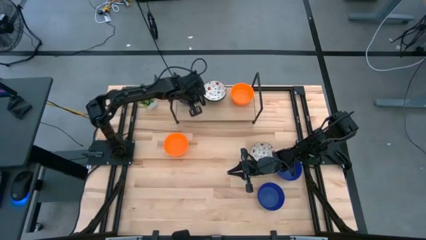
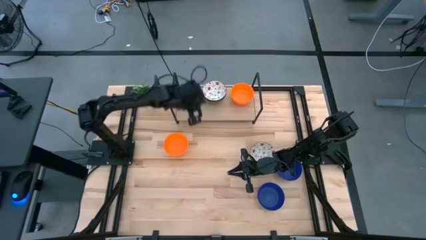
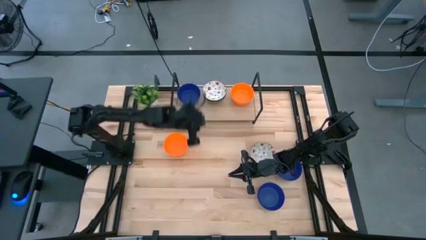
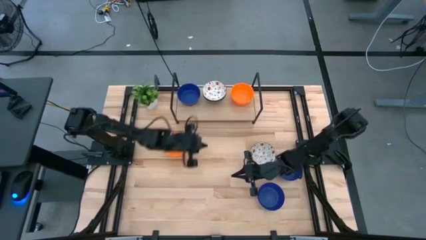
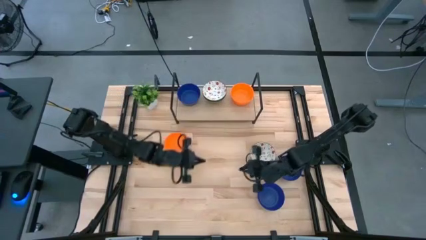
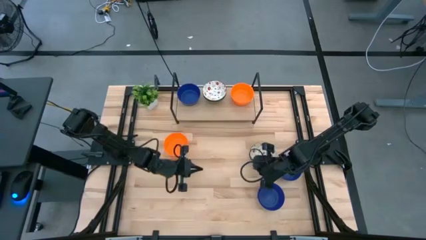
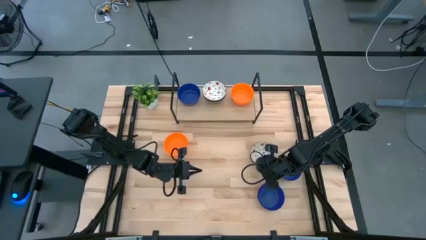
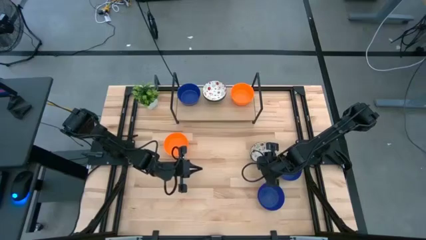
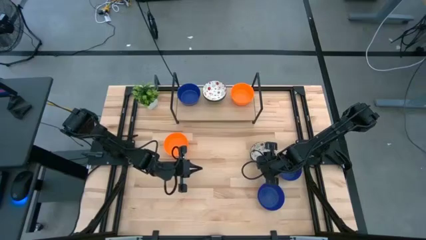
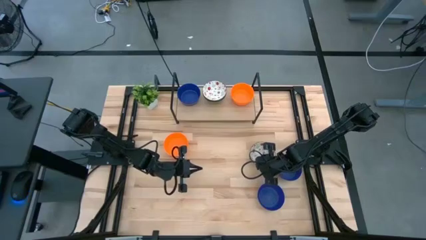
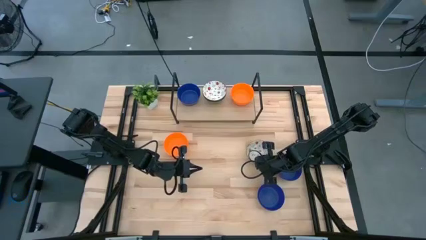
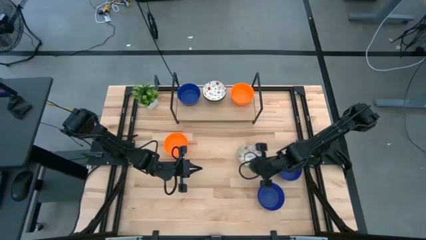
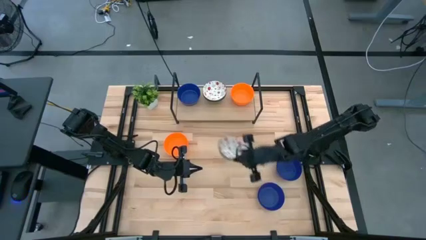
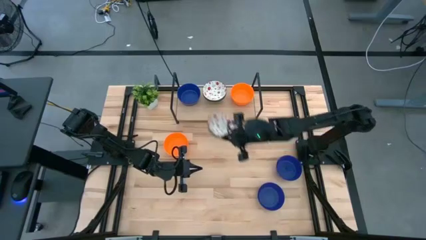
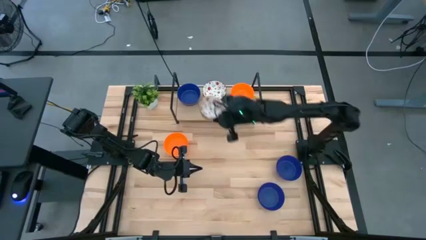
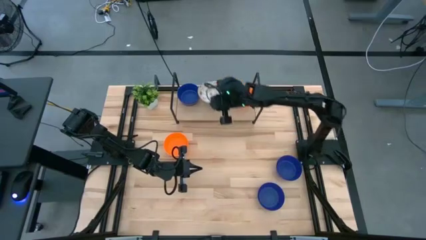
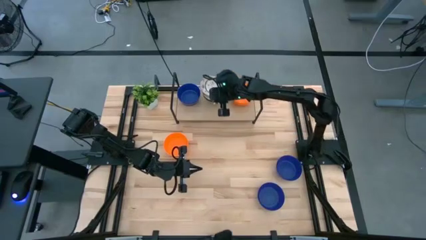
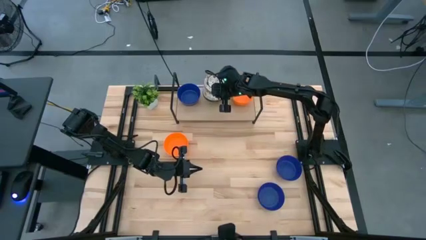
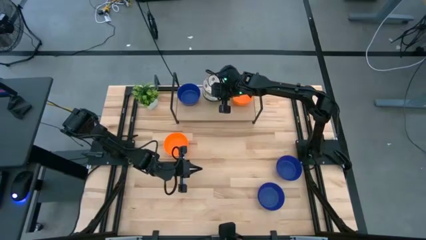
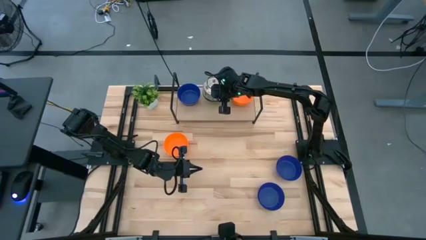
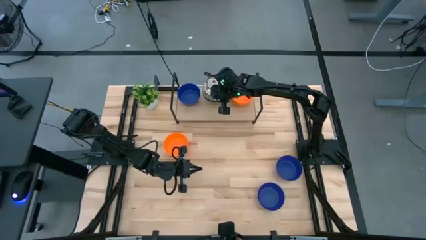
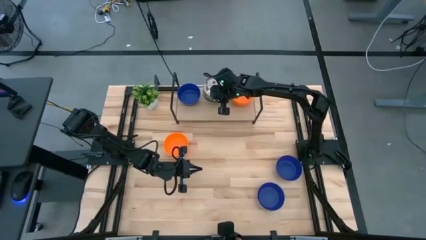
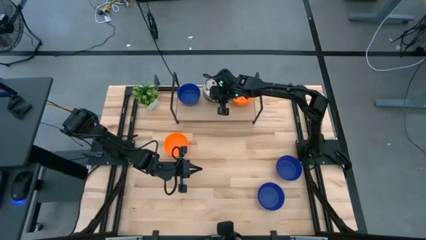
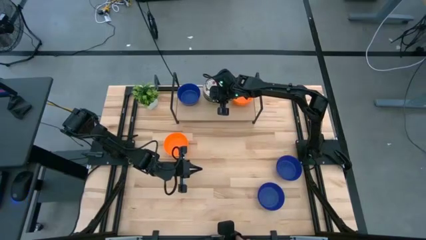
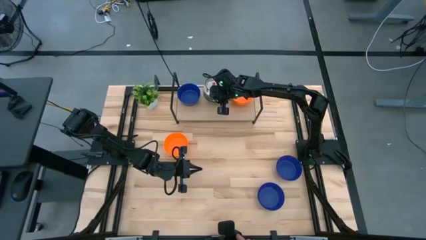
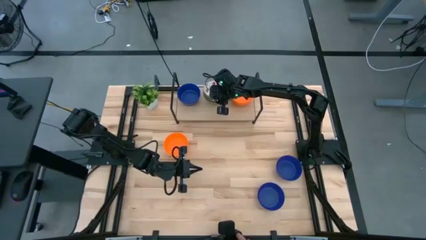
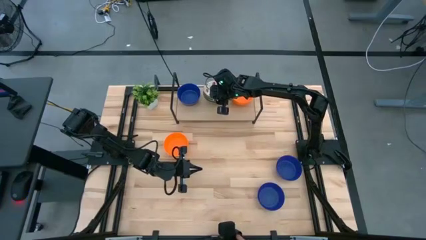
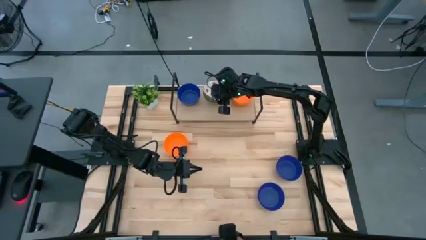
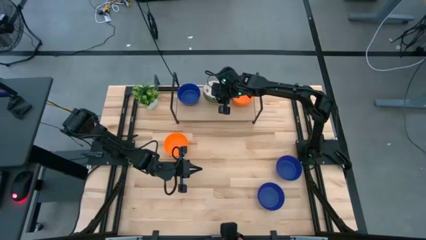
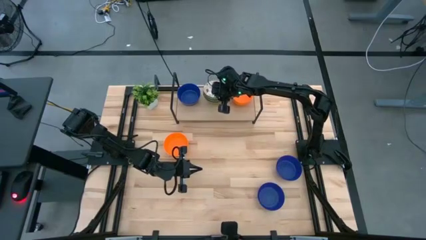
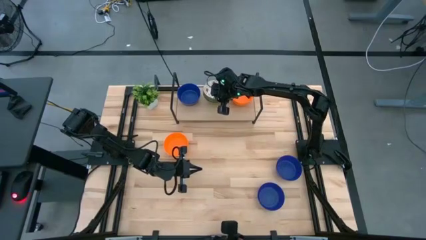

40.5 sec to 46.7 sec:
Task: Pick & Place Mini bowls
Stack the white bowl on top of the white bowls on the shelf

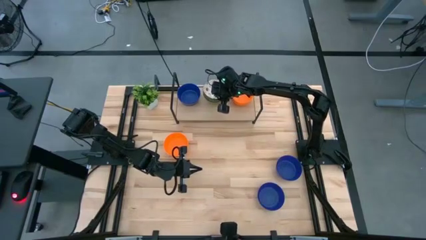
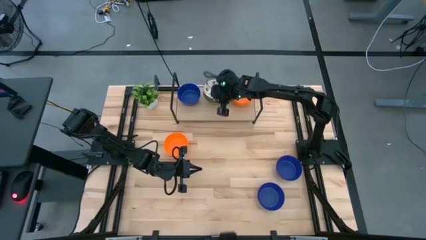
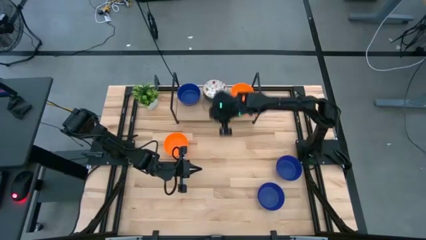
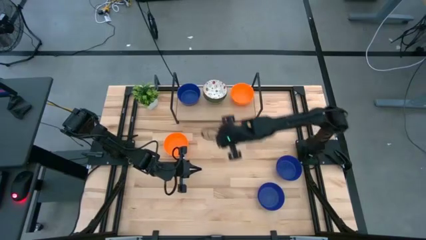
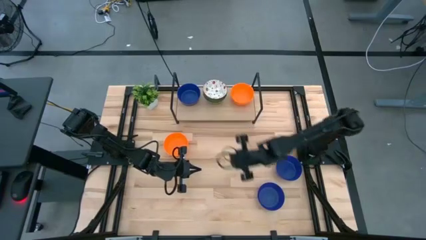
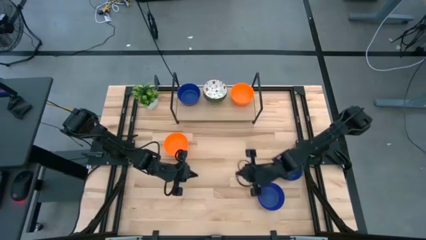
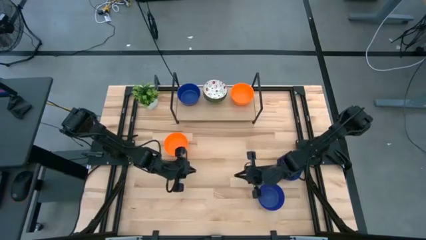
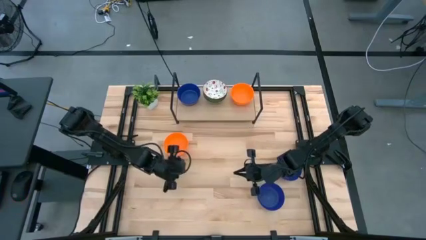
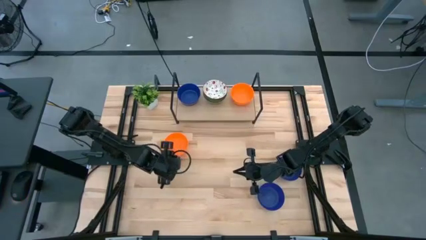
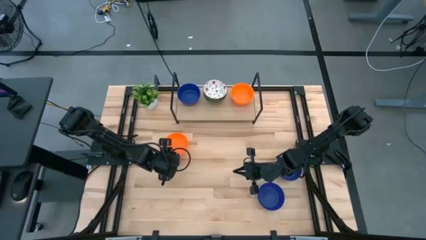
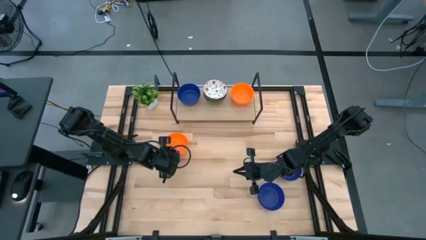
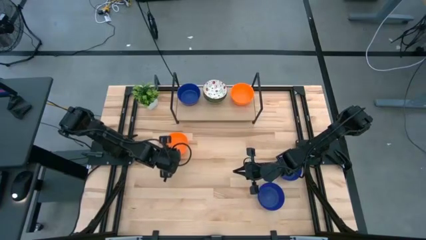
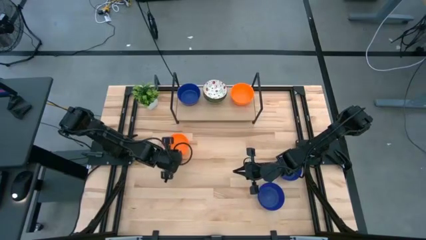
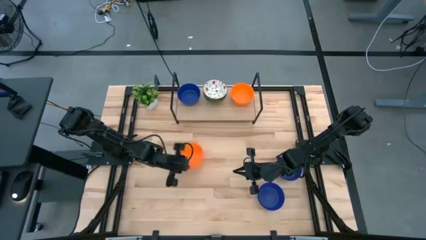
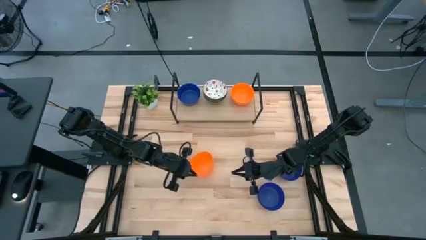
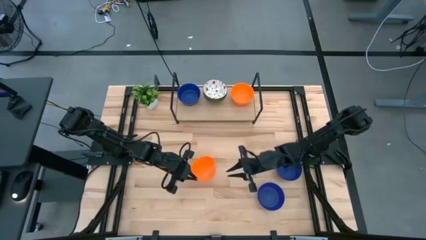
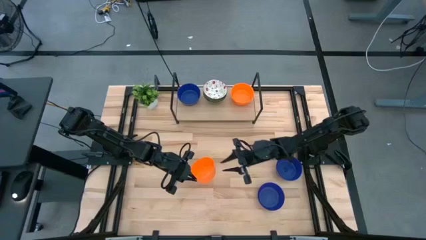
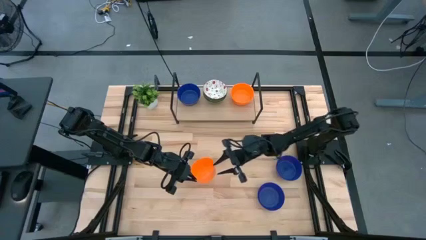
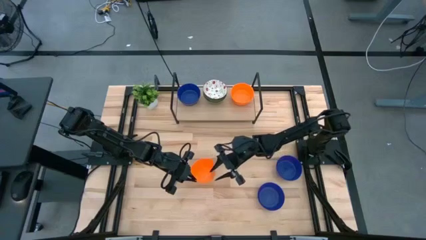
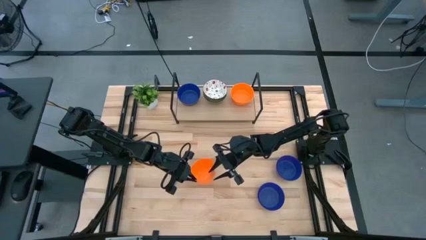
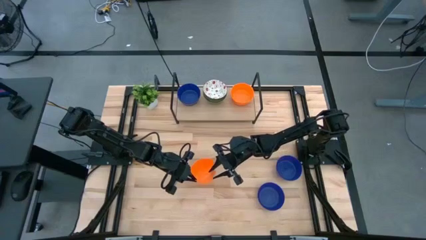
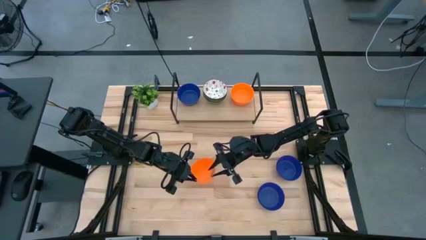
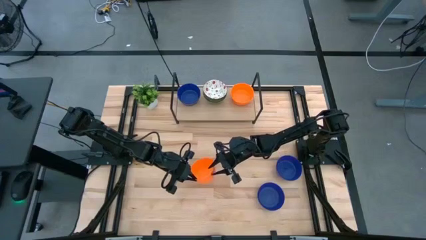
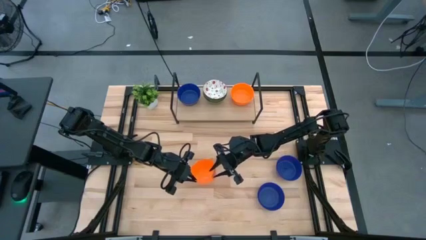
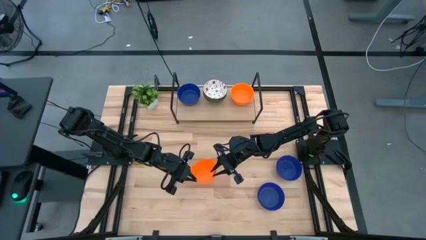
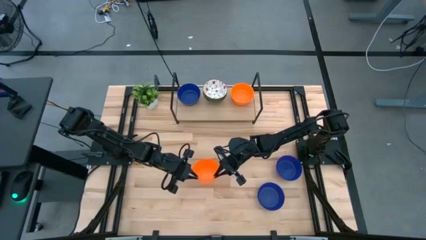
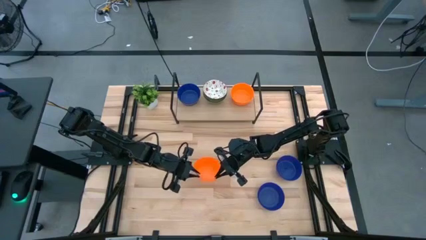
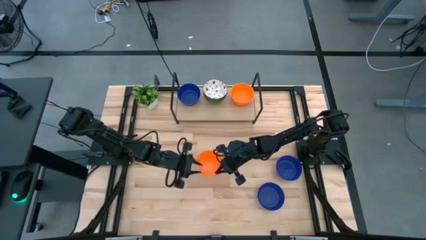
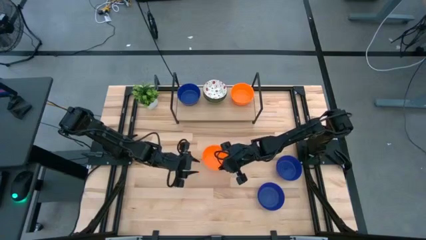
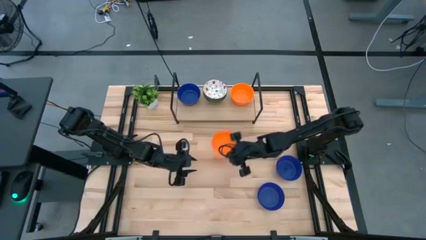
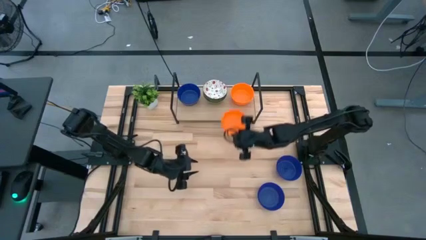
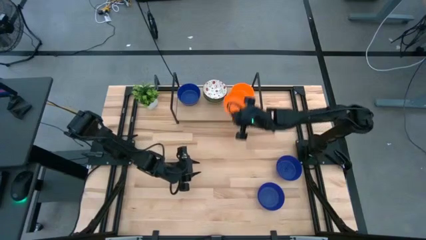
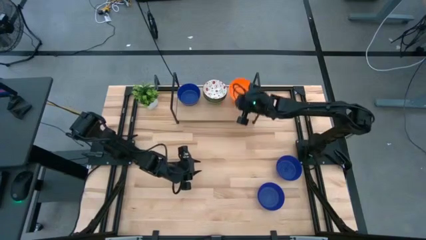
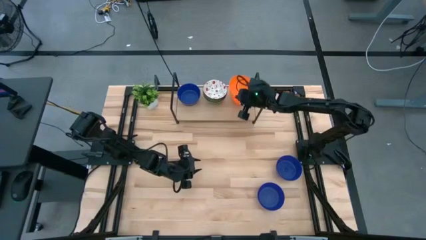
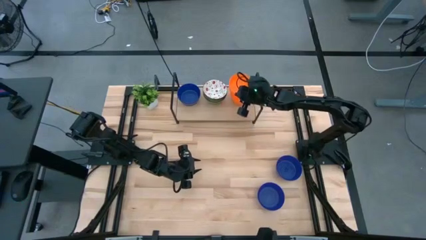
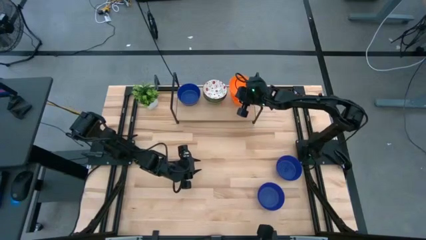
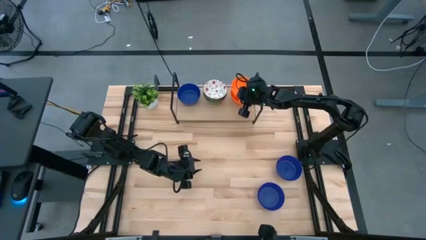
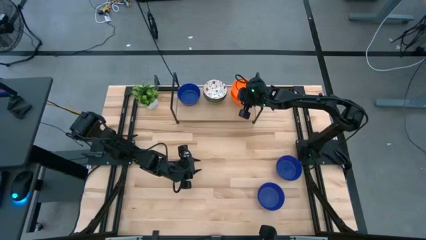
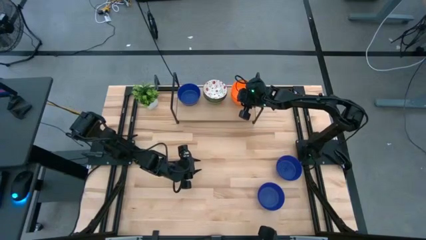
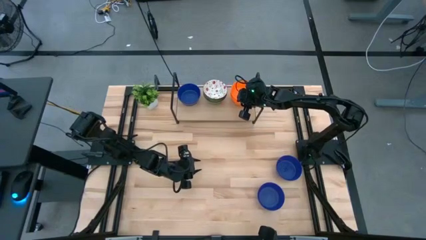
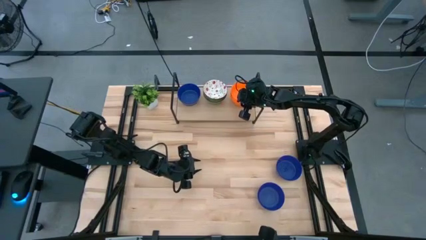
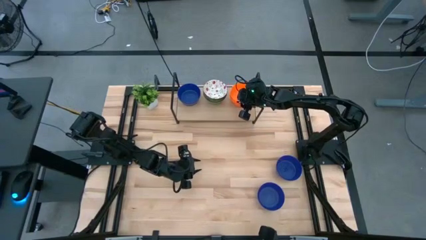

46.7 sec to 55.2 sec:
Stack the orange bowl on top of the orange bowls on the shelf

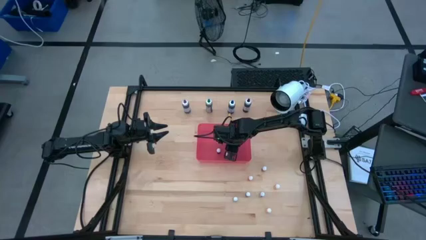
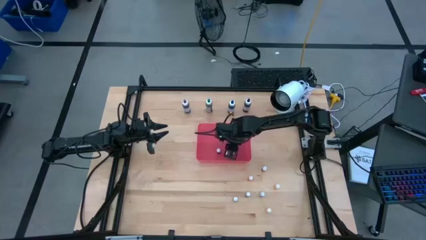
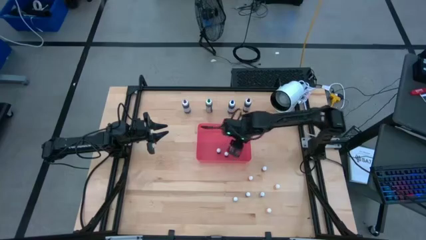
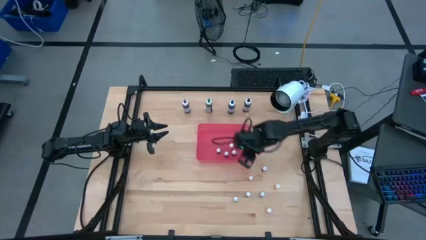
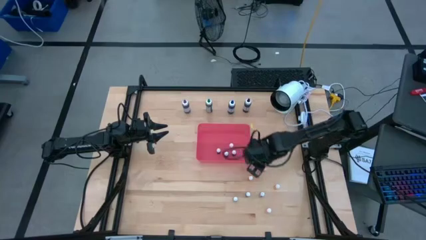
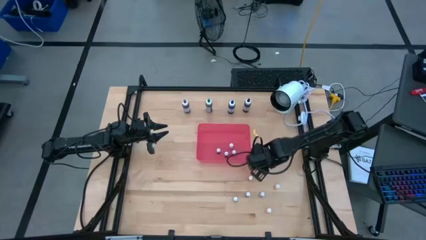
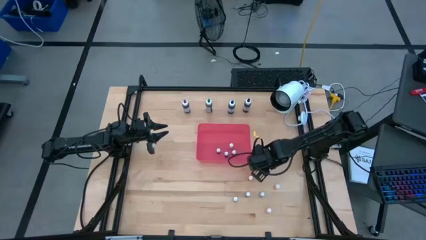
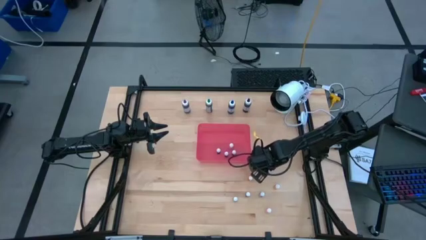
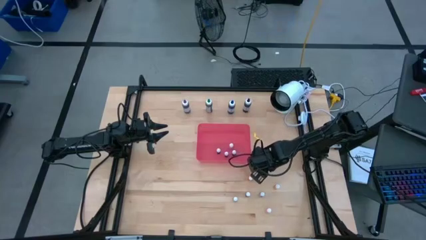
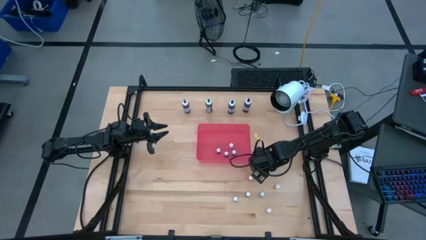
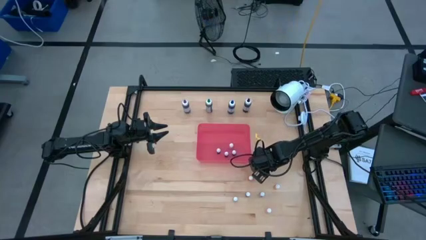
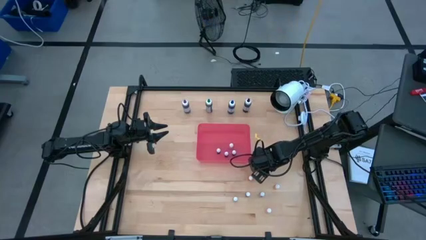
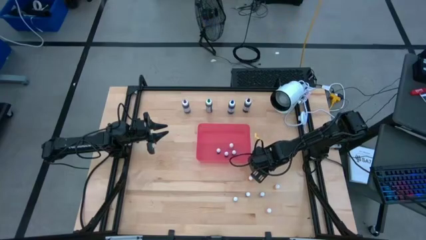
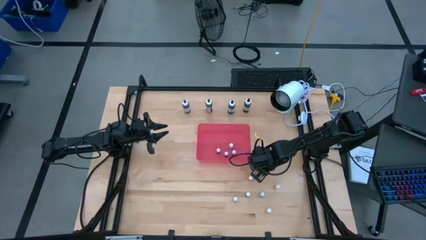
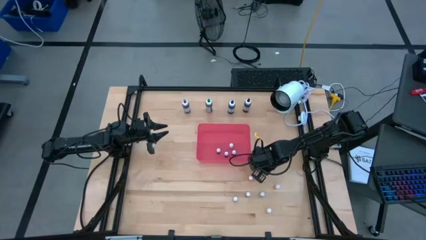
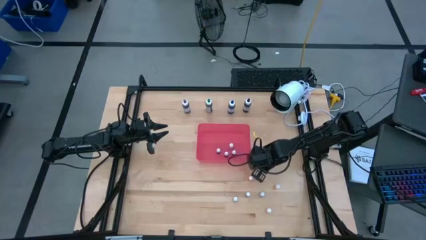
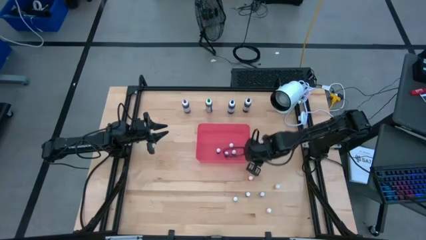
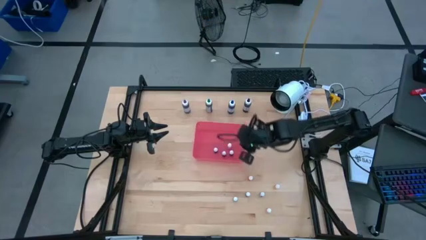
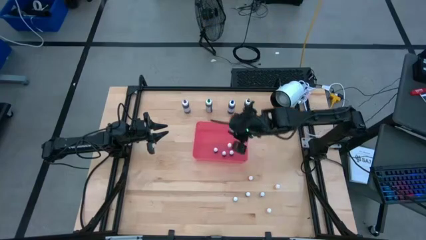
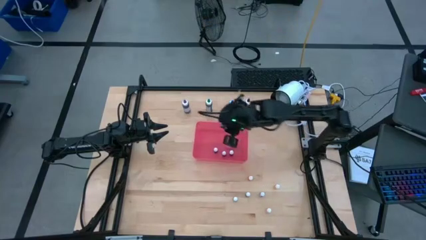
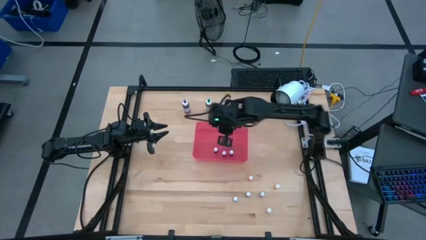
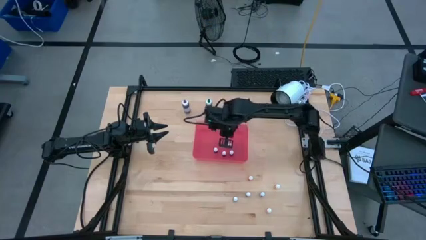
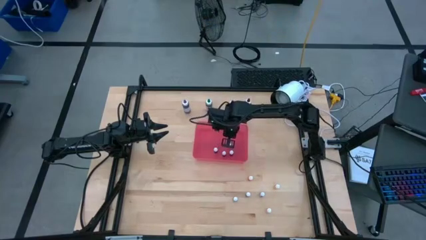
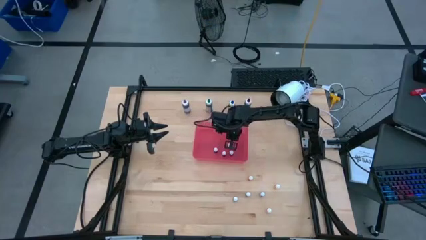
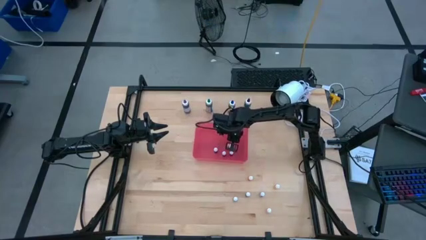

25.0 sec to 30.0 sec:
Task: Pick & Place food coloring
Put the small red food coloring bottle into the red bin
